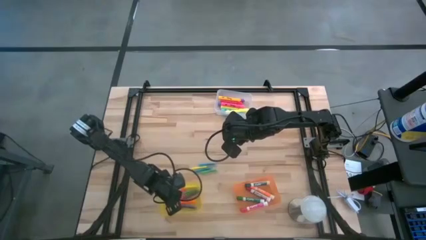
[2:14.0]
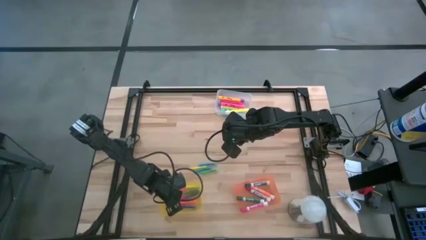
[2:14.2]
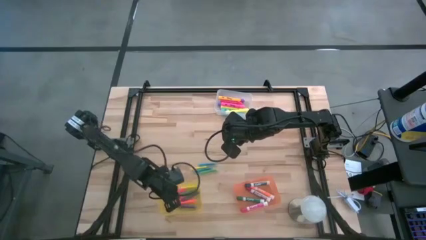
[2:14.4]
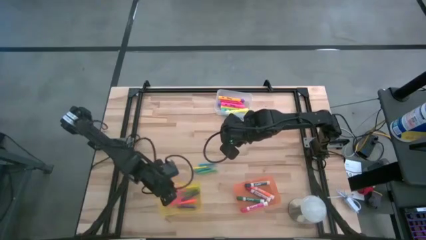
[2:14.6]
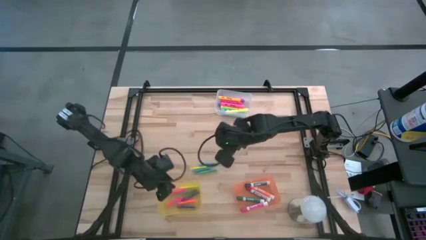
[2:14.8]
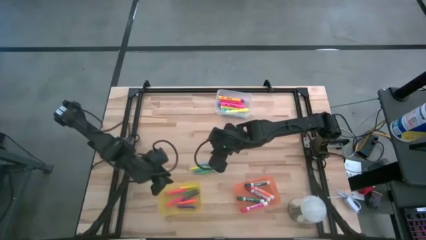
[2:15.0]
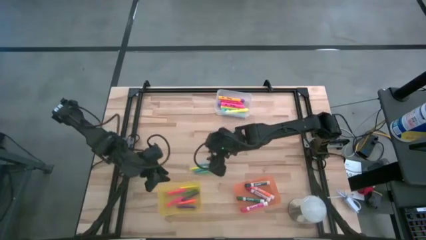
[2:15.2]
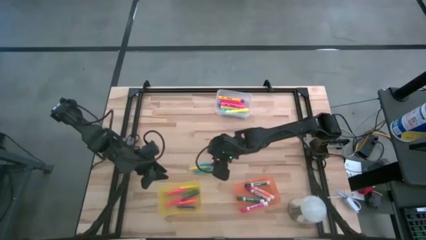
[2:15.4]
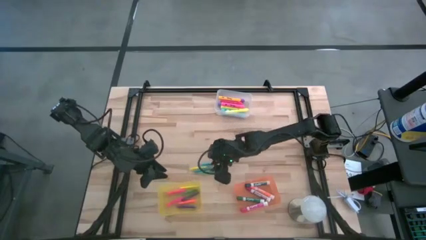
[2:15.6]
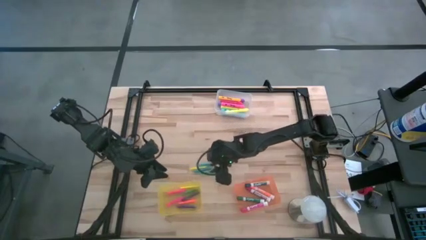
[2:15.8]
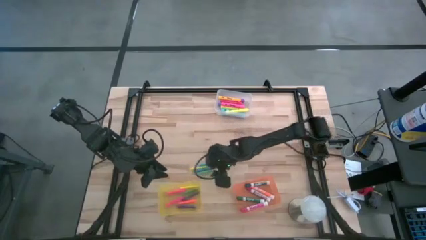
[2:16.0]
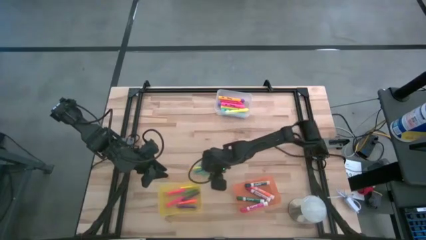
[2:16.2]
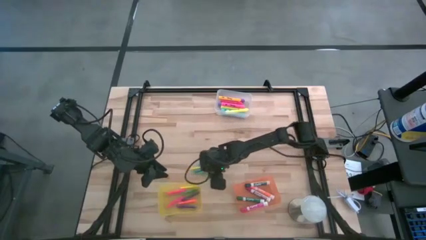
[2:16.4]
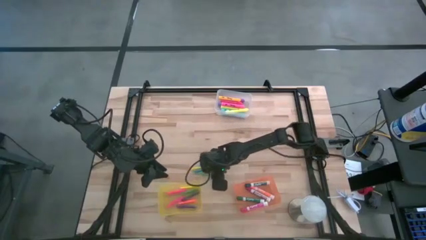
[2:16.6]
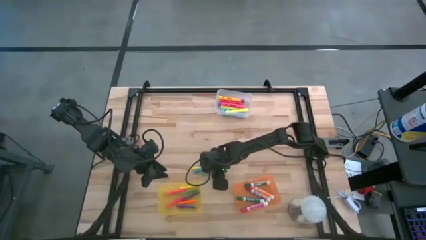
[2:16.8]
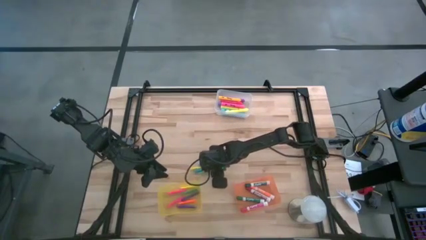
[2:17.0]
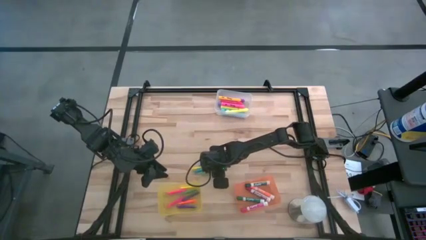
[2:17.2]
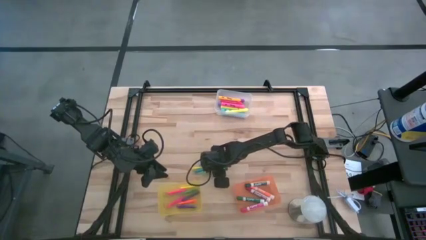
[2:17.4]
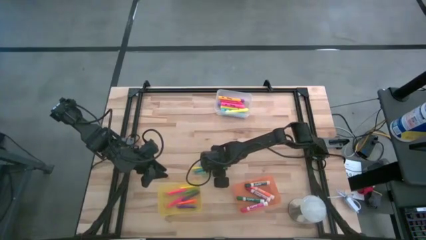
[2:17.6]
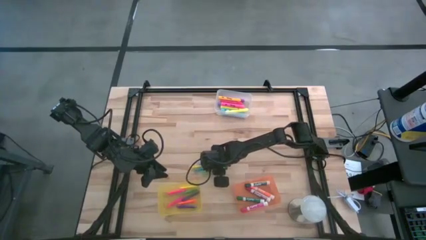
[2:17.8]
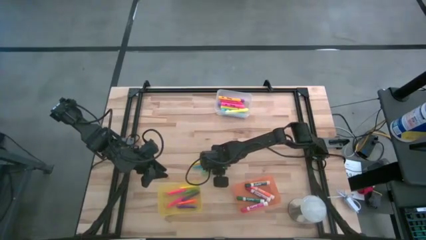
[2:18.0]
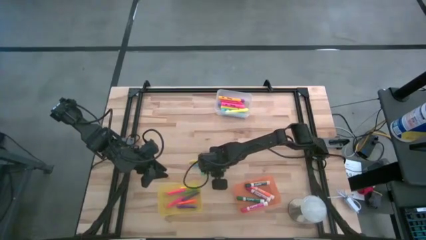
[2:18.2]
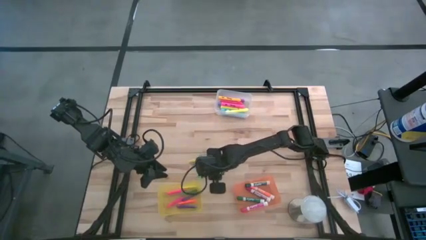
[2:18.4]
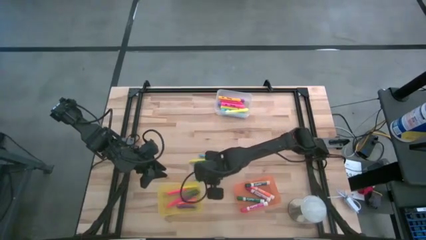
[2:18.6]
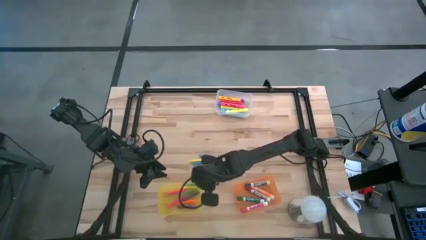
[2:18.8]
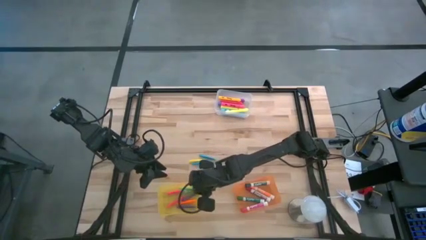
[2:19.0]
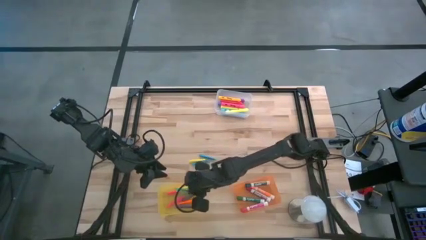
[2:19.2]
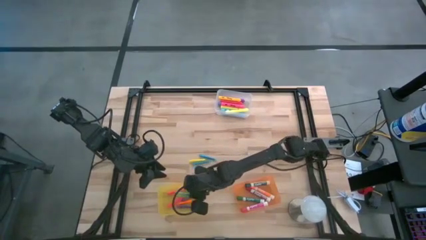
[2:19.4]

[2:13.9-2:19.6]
Task: Pick & Place Markers
Put the green pen into the yellow bin

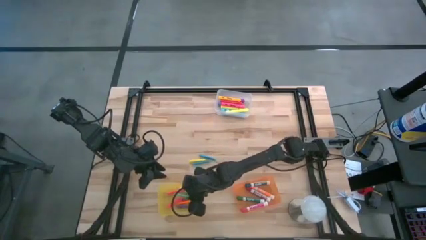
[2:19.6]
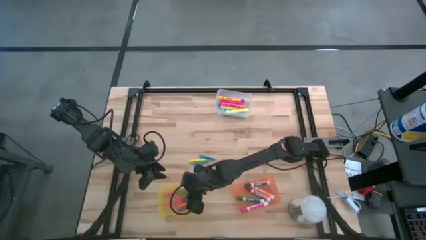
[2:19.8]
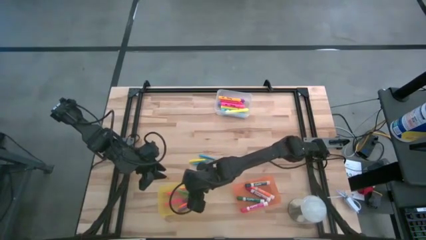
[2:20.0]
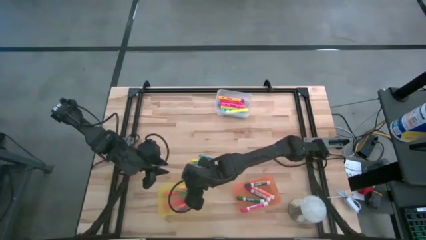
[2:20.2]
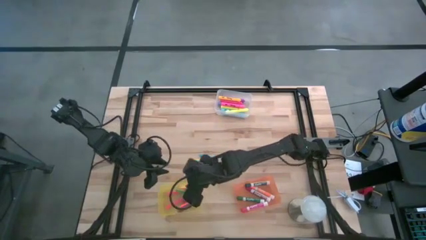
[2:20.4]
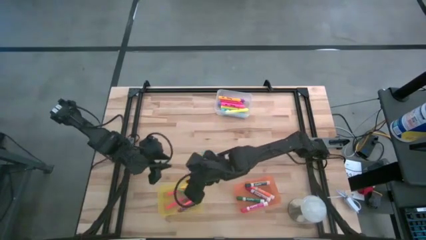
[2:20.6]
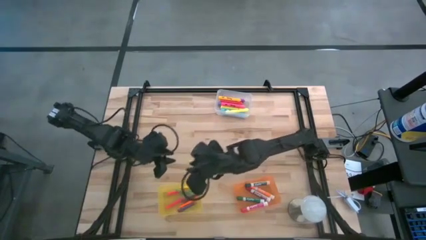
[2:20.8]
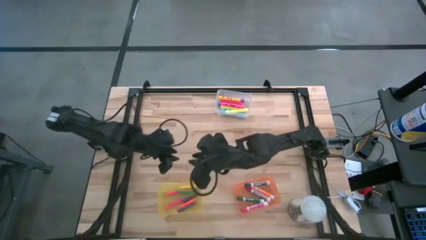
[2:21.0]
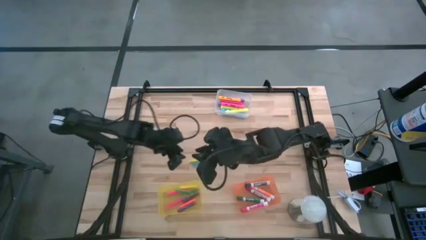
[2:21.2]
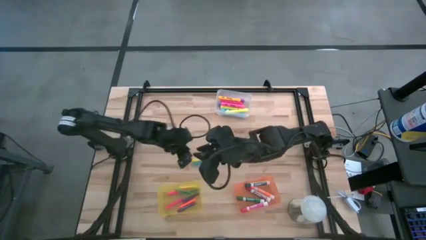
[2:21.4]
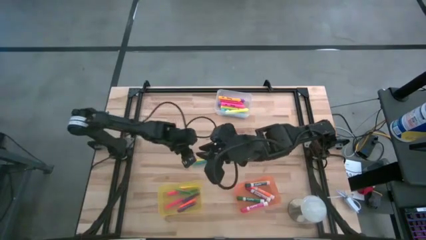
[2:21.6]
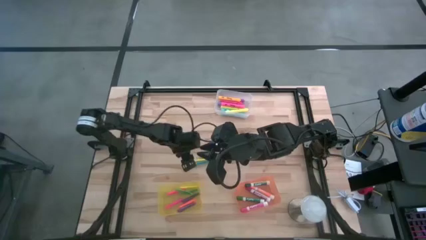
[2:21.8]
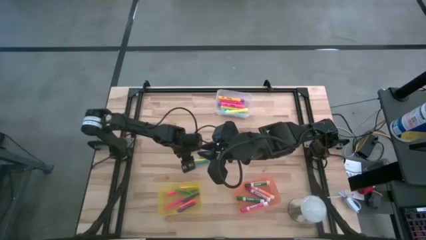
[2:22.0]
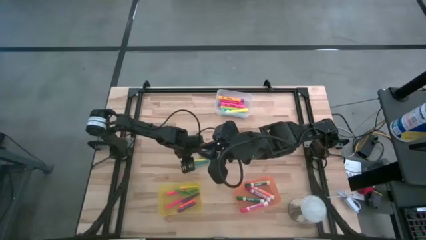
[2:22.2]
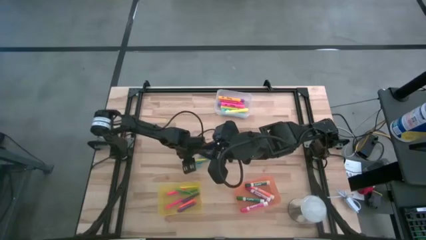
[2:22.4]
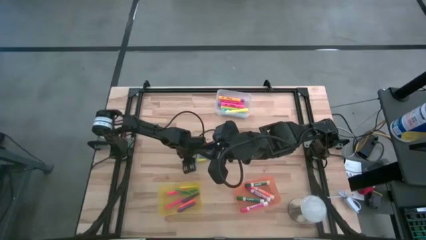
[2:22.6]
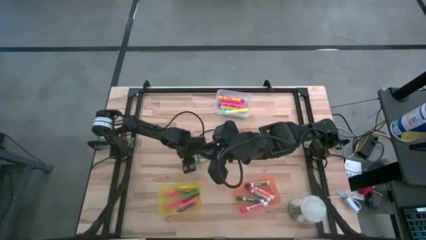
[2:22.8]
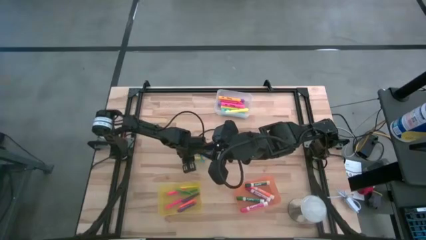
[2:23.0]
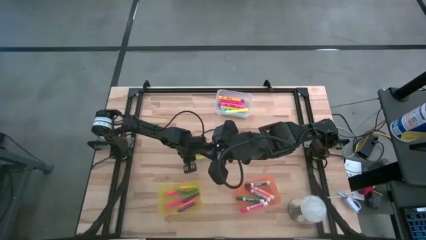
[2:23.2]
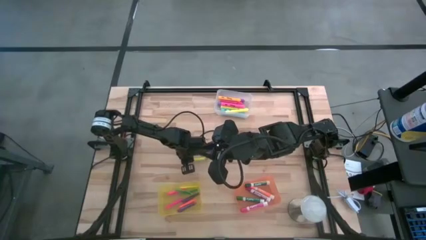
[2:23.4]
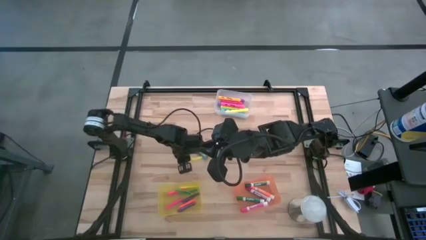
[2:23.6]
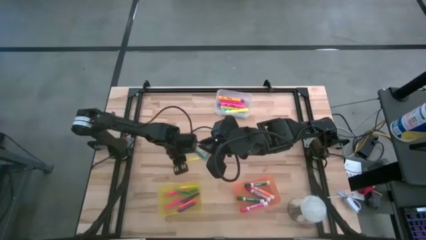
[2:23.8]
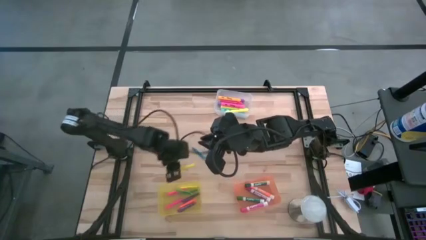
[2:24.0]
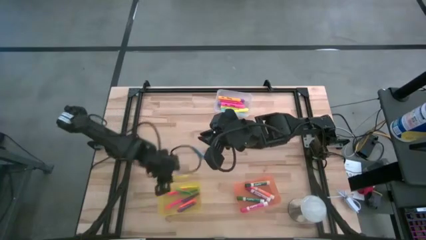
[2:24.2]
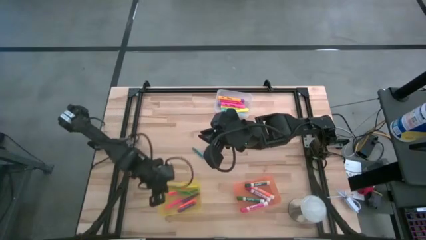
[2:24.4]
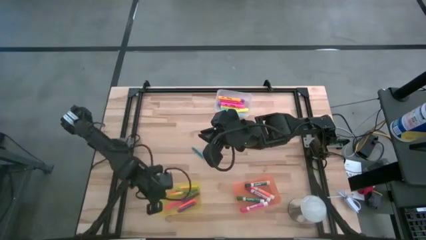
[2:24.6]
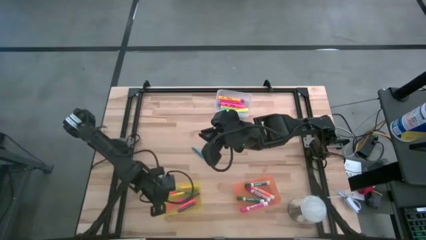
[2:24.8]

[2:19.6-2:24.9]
Put the yellow pen into the yellow bin

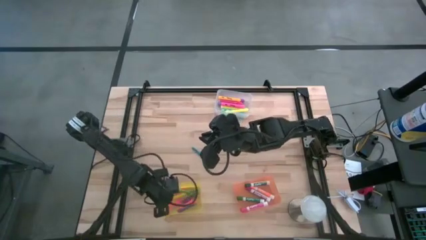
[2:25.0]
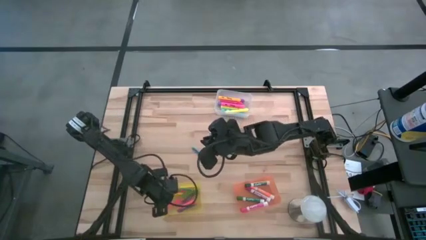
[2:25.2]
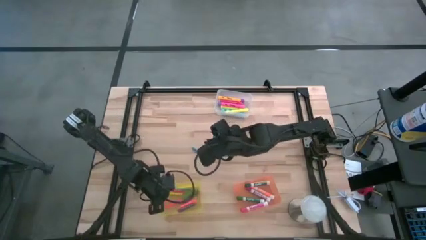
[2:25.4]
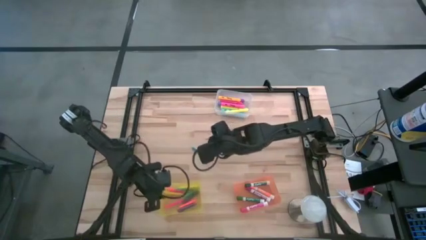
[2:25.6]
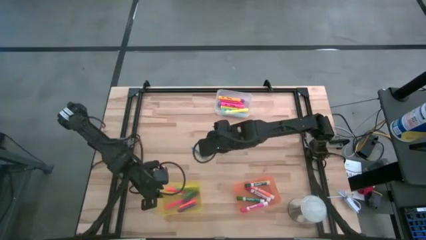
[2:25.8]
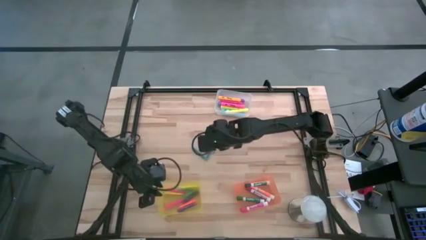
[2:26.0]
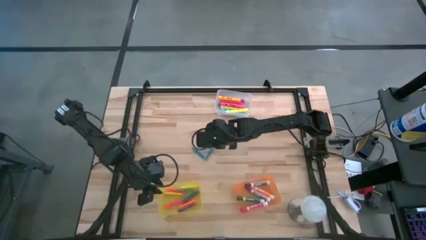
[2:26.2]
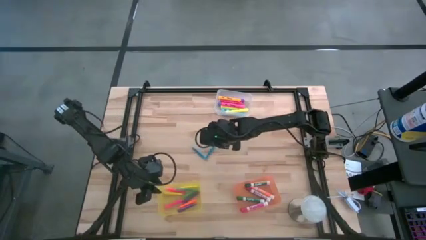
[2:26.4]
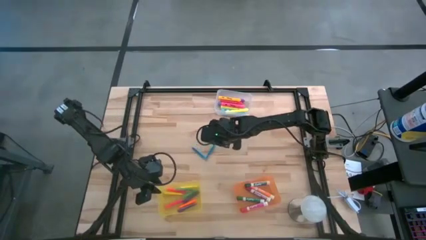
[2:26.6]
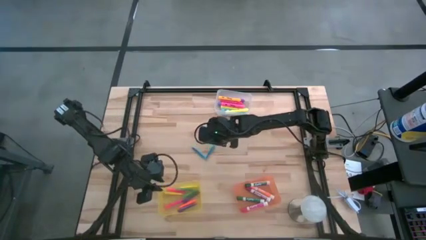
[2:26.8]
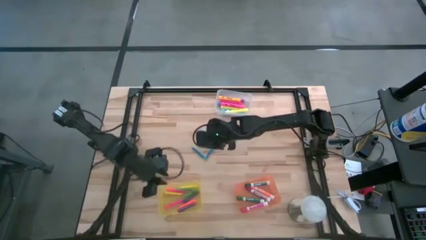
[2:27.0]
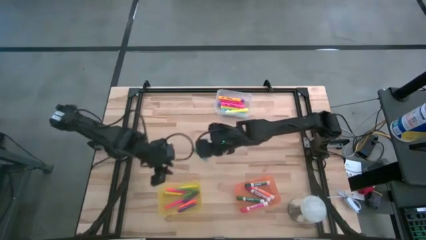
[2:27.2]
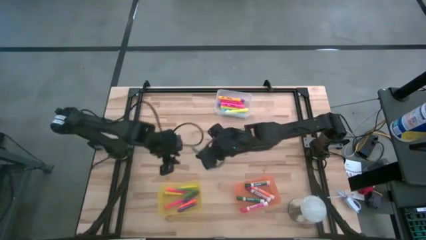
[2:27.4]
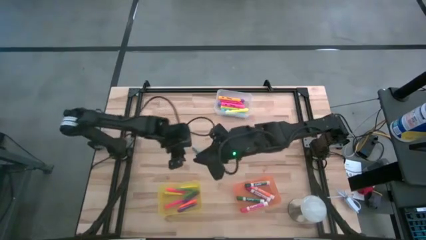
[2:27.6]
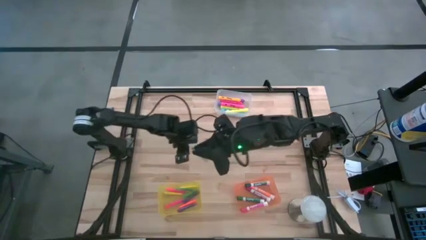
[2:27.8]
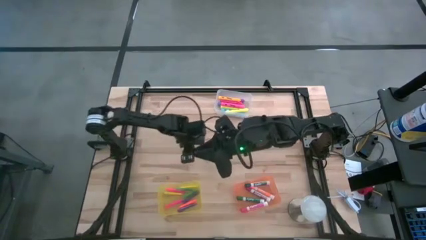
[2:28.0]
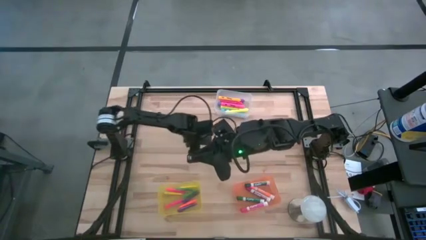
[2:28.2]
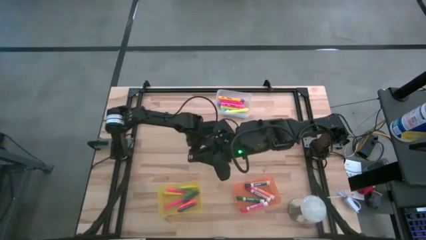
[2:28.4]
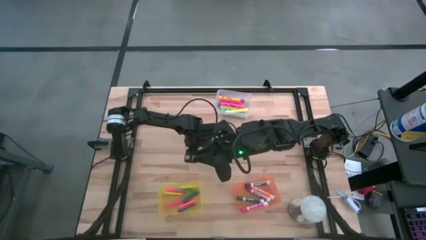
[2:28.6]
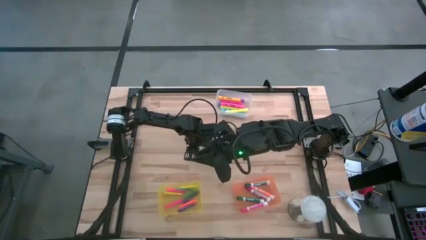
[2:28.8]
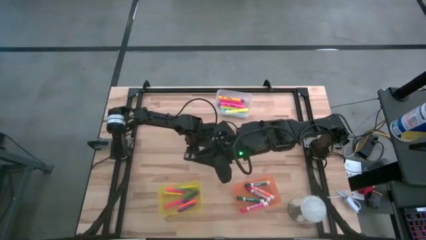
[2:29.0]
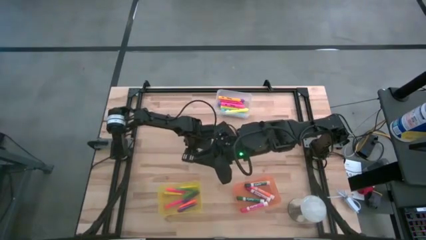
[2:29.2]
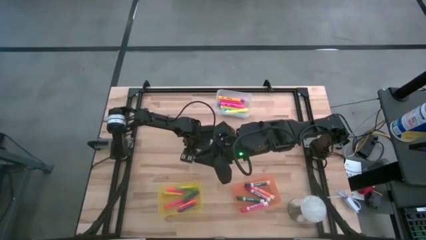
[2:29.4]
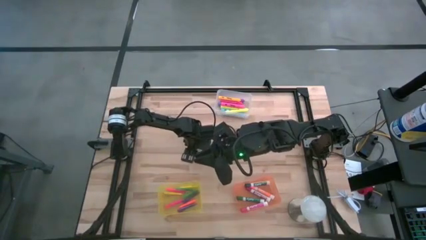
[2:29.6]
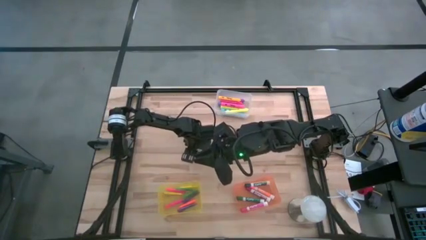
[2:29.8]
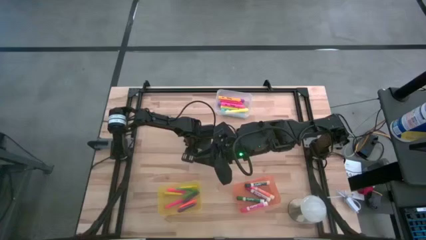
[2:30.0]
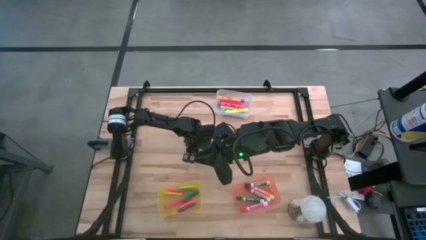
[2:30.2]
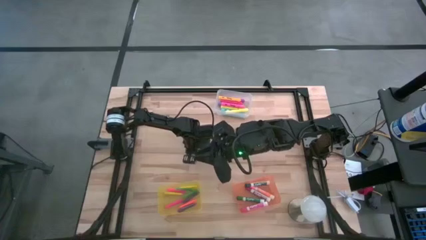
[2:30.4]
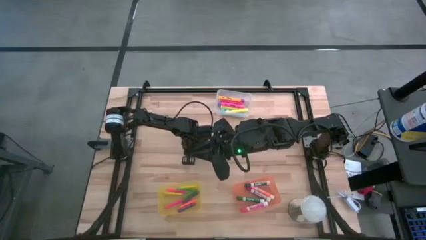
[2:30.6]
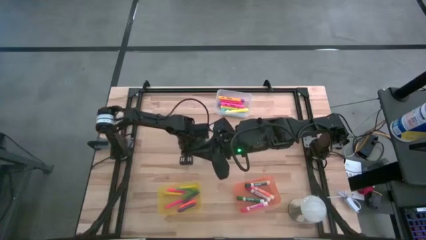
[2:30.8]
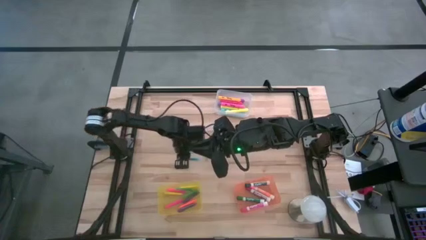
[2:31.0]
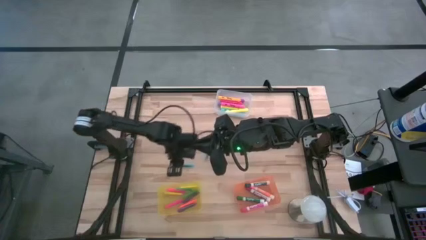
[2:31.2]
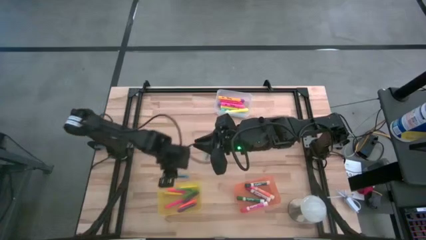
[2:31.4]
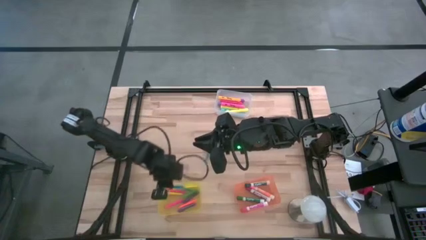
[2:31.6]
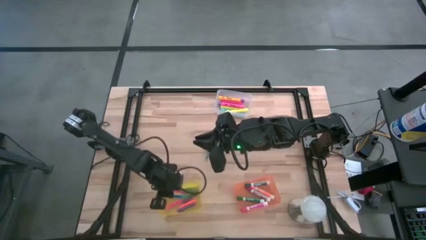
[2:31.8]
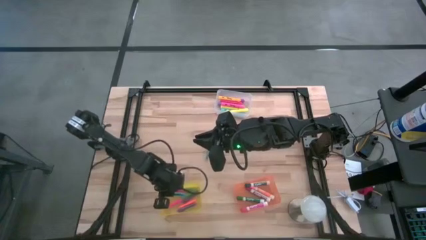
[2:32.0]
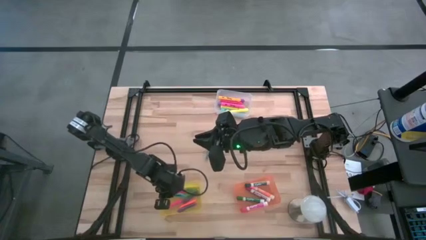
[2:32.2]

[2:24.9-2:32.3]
Put the left blue pen into the yellow bin
